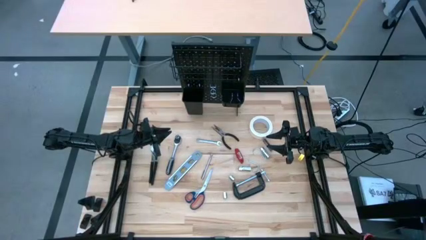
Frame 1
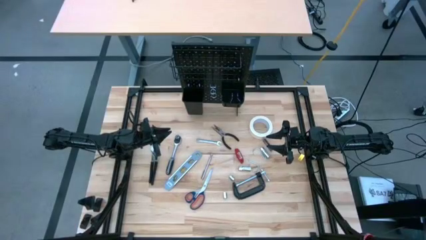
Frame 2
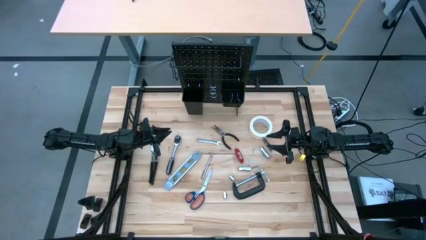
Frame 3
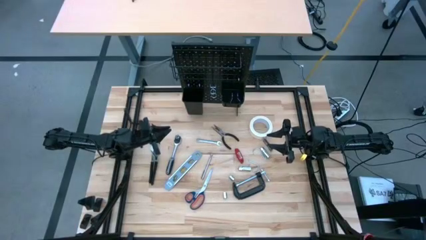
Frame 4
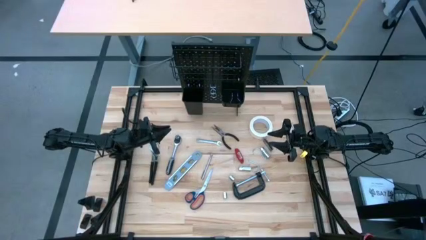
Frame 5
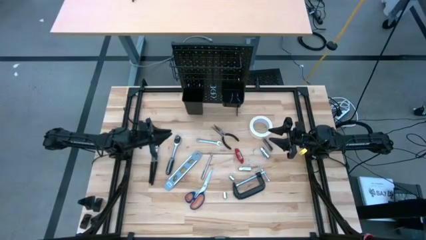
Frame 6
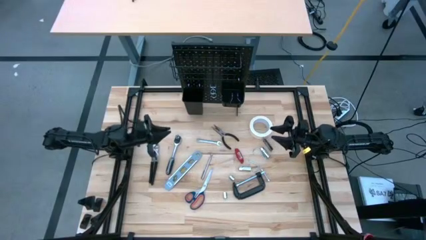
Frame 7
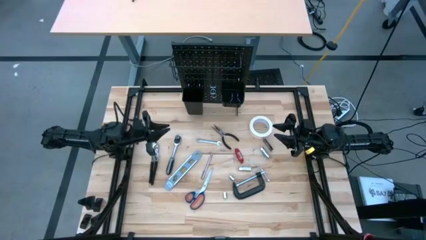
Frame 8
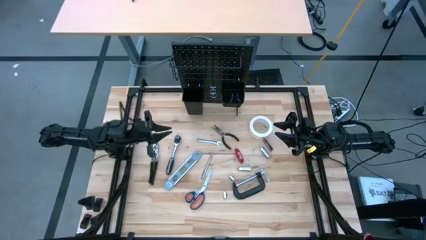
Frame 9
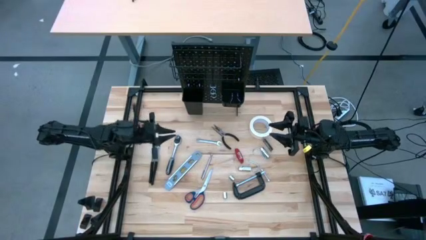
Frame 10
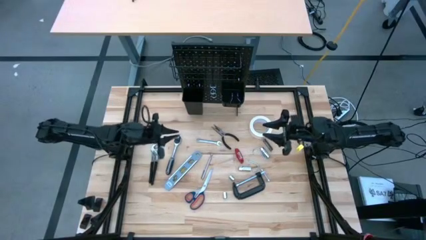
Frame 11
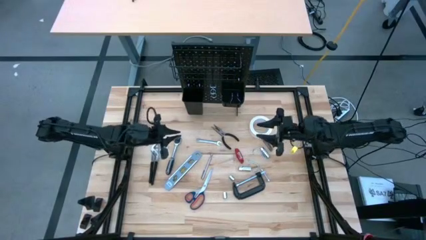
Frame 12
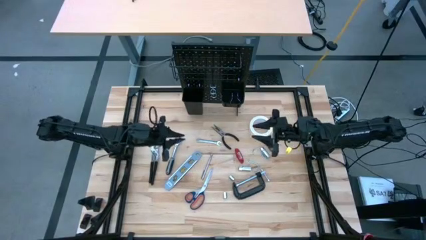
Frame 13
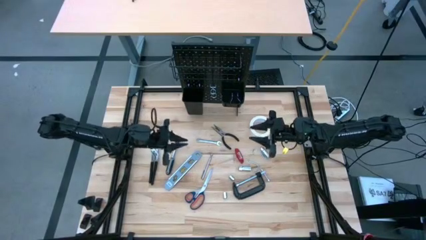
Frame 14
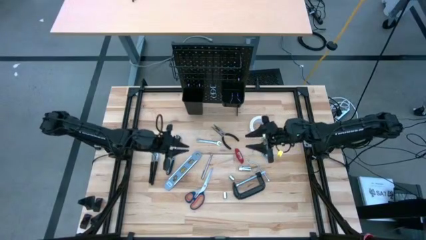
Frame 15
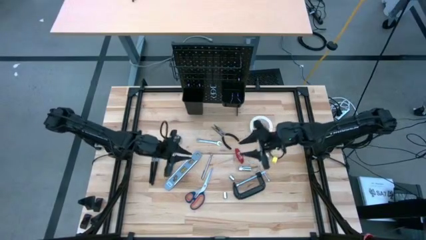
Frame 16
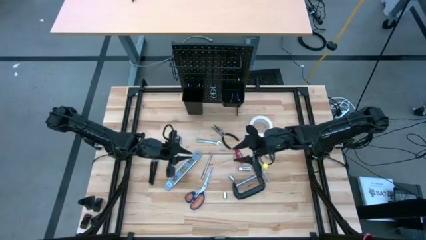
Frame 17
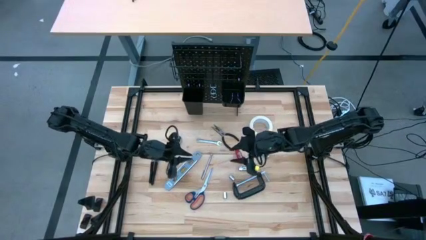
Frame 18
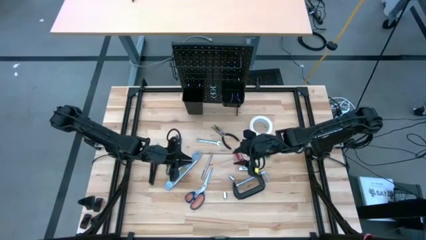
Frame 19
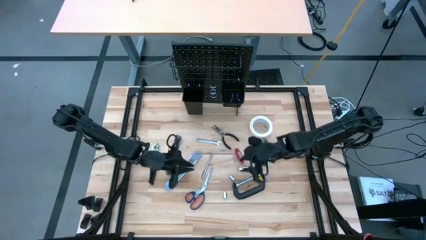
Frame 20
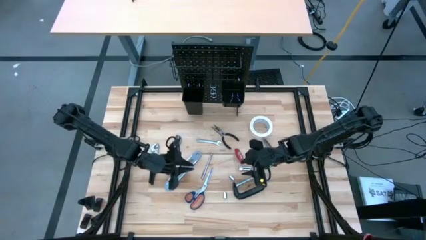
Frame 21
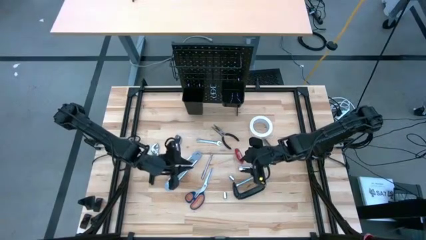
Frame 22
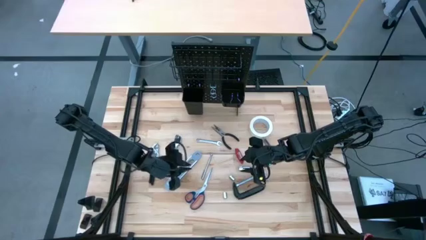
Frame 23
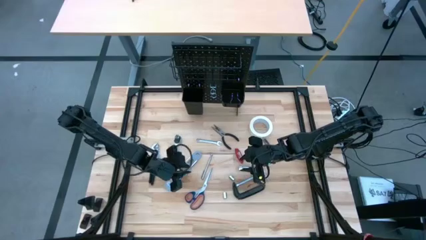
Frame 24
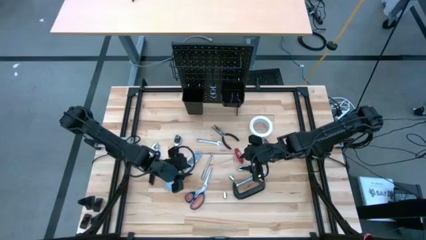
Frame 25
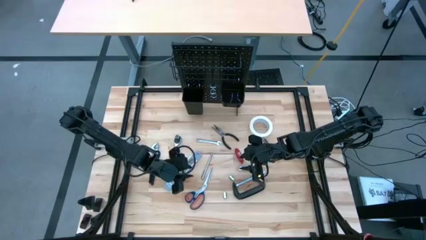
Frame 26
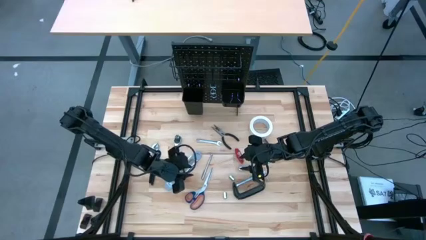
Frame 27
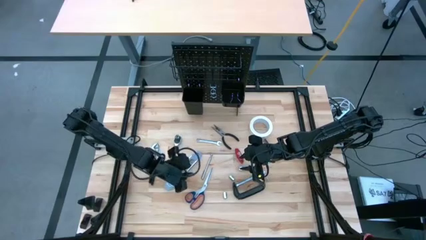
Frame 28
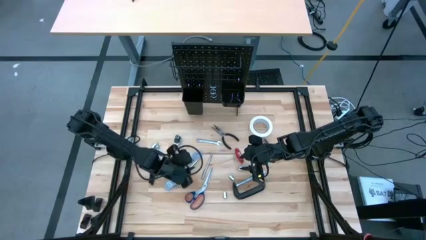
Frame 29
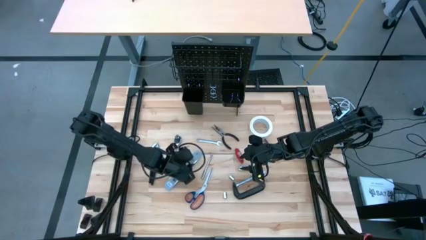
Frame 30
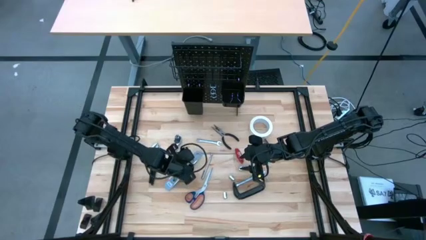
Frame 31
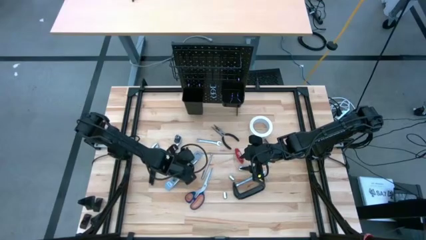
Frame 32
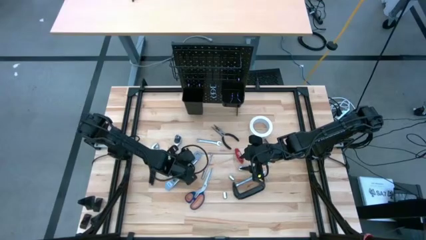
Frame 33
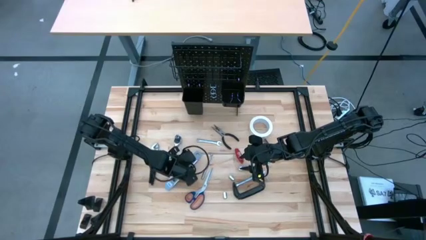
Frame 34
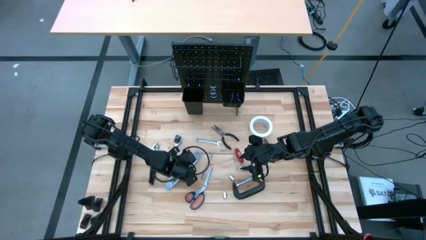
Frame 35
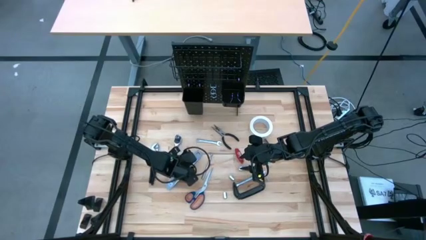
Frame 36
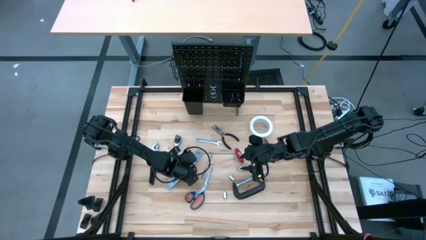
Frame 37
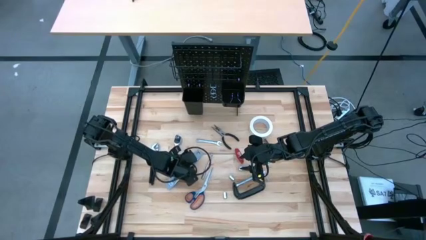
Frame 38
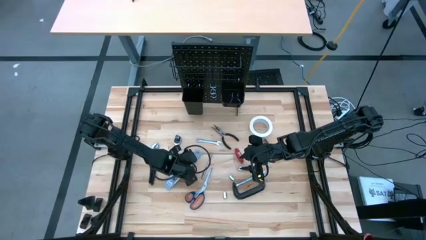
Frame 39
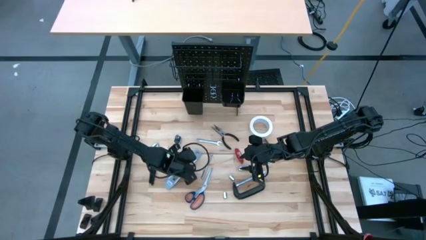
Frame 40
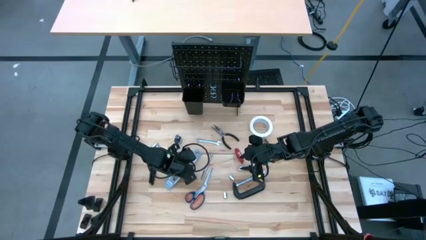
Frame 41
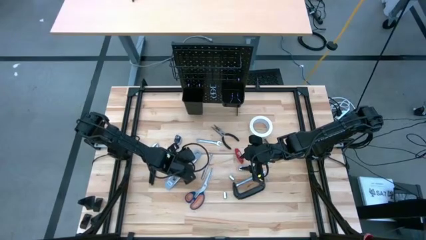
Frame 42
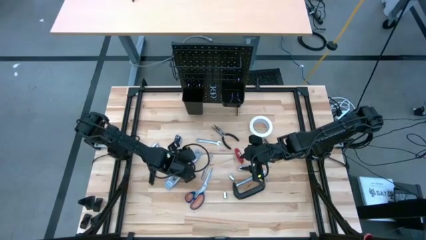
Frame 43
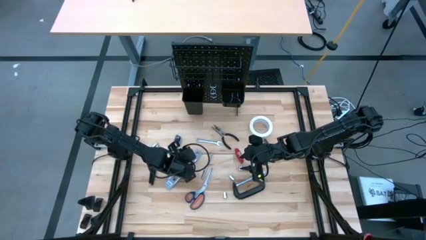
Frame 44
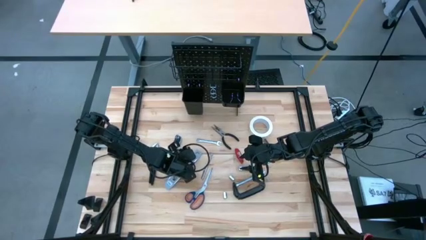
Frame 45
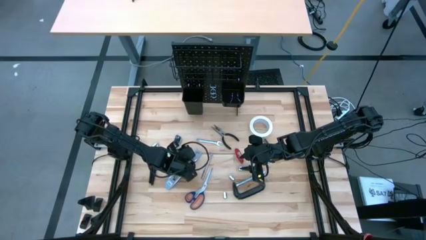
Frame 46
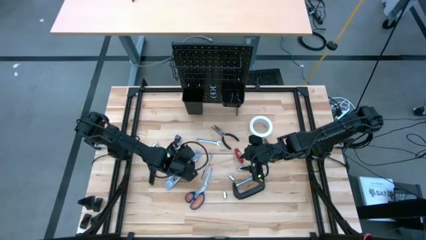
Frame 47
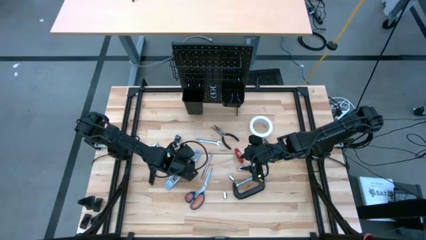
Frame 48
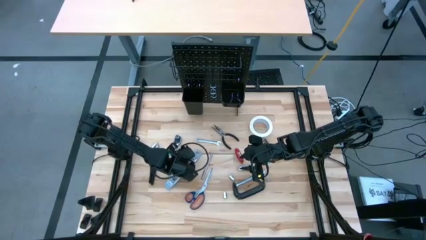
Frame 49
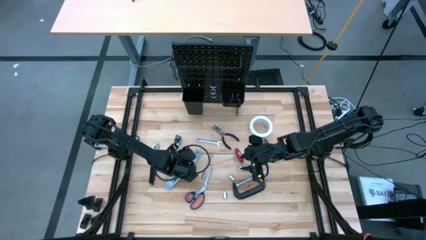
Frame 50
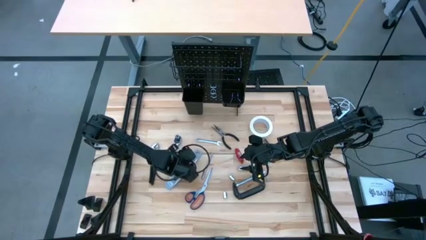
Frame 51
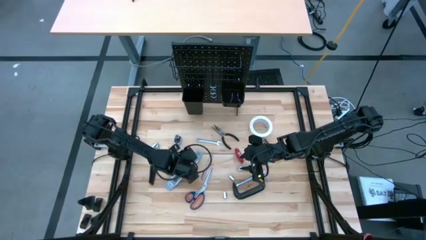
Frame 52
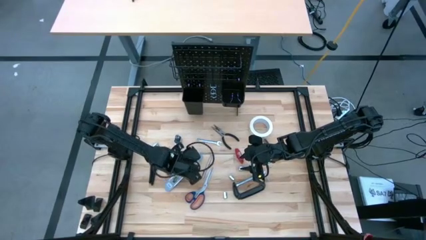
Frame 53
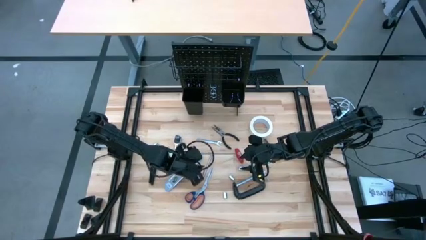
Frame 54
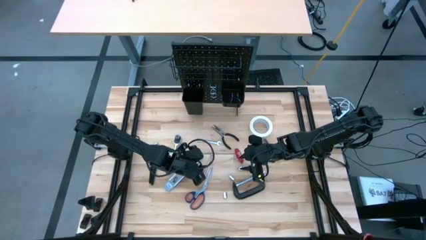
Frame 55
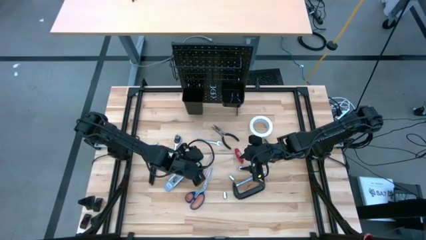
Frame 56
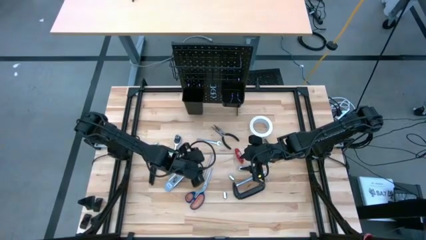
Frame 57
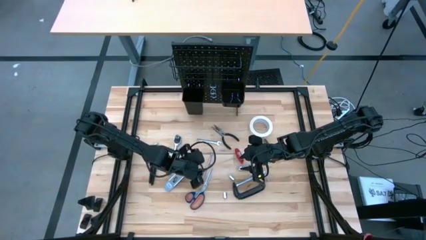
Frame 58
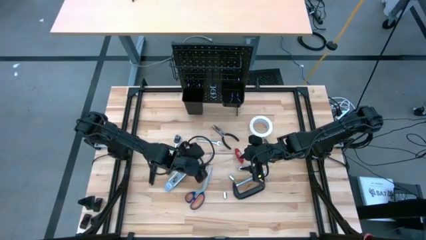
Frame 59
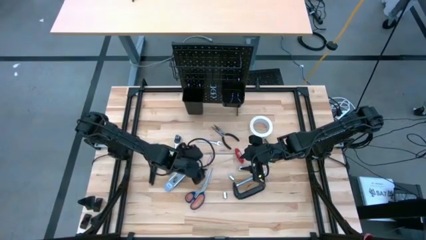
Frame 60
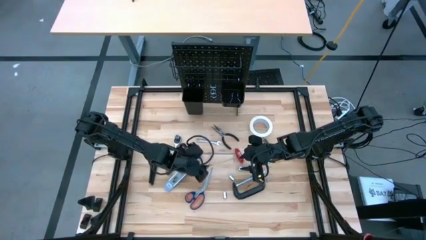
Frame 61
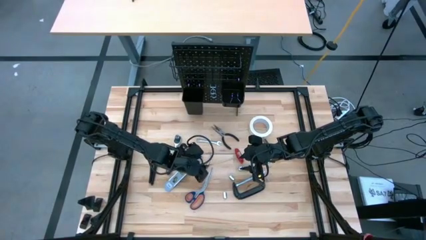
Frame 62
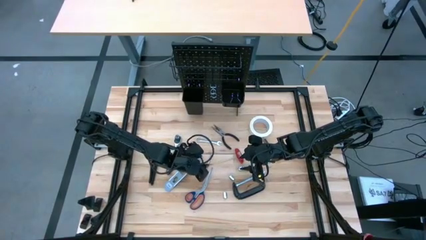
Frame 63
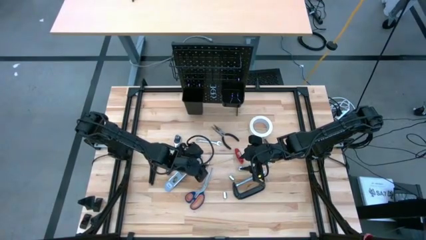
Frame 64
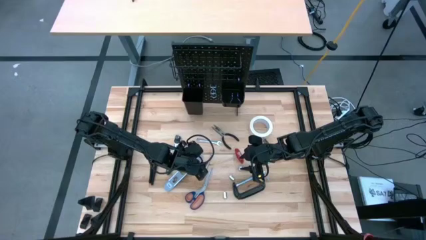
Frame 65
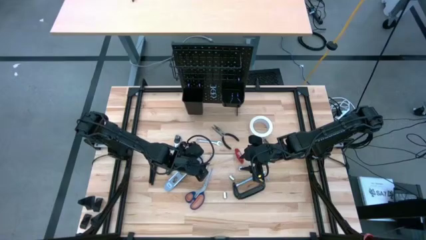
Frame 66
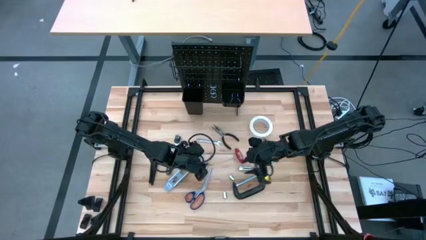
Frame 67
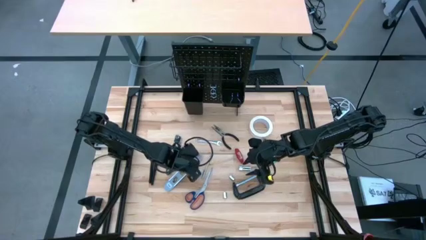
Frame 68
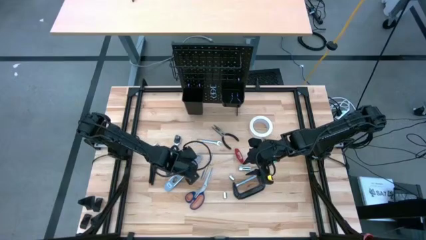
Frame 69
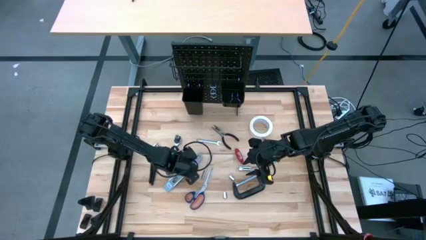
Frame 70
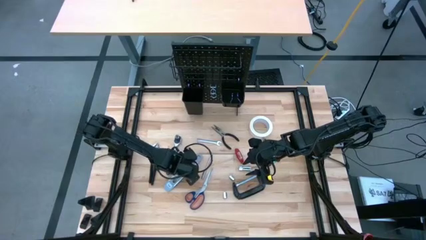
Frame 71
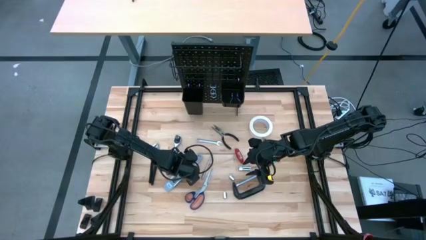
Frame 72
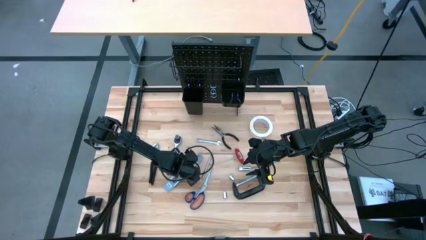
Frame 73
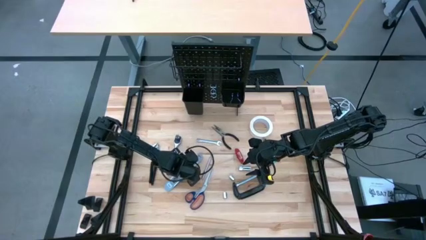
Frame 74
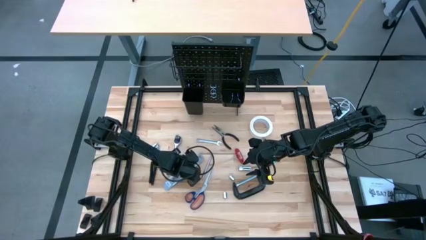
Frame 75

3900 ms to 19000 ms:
Task: Hang tools onto peg board
Put the gray spirit level into the left black bin on the peg board
